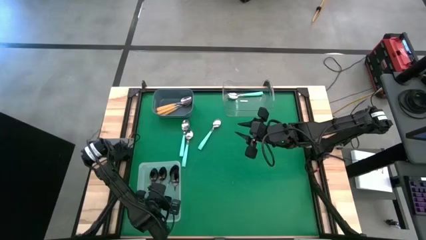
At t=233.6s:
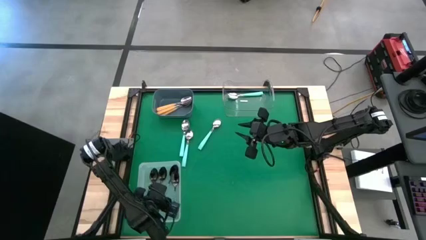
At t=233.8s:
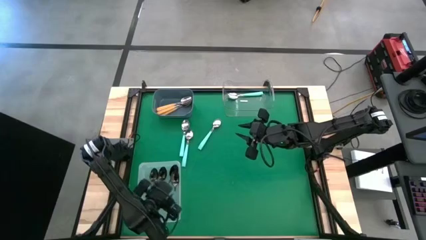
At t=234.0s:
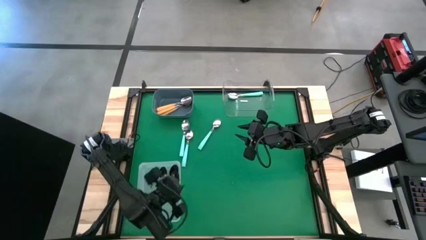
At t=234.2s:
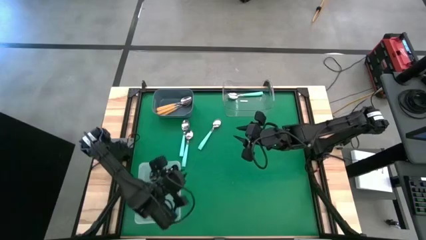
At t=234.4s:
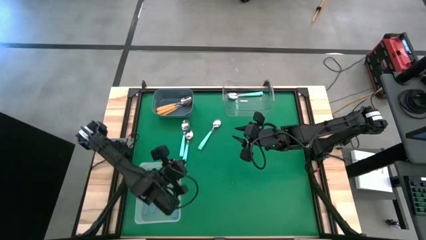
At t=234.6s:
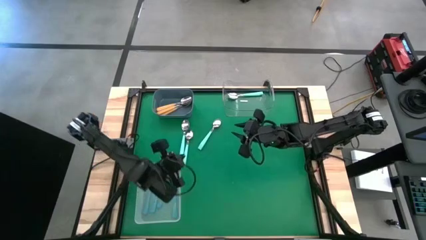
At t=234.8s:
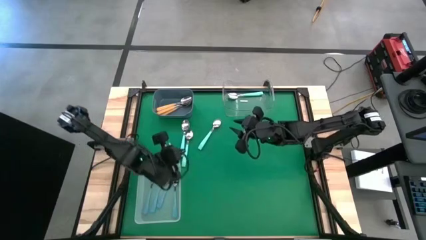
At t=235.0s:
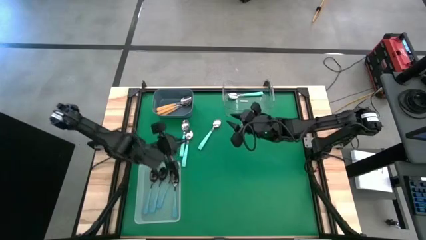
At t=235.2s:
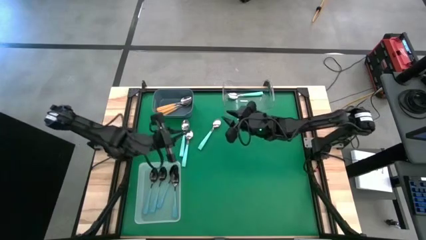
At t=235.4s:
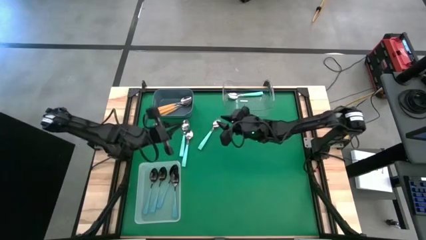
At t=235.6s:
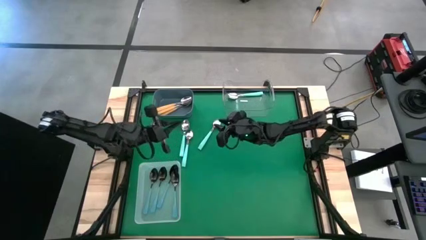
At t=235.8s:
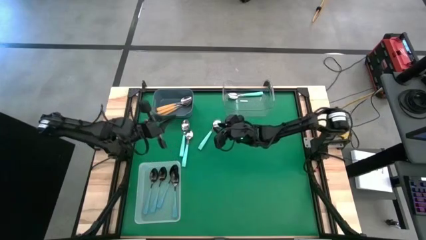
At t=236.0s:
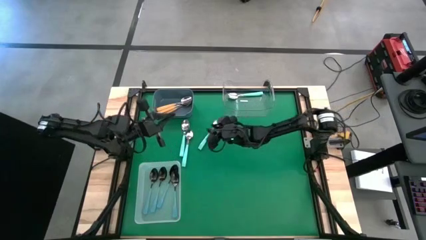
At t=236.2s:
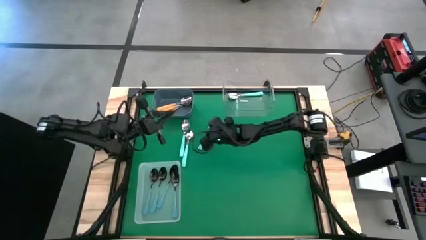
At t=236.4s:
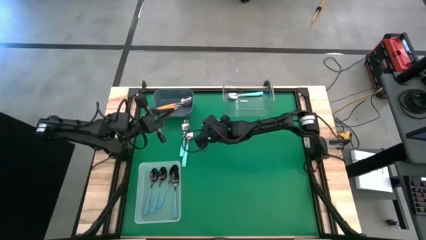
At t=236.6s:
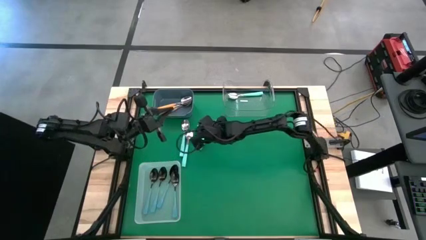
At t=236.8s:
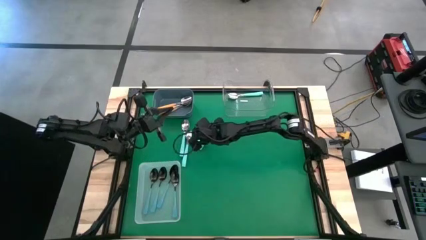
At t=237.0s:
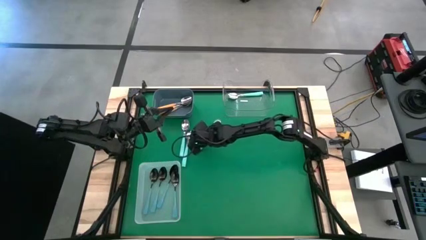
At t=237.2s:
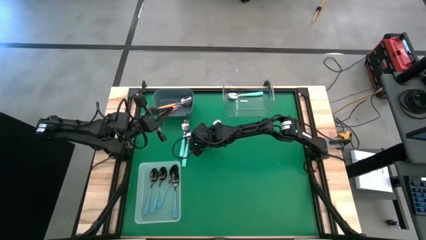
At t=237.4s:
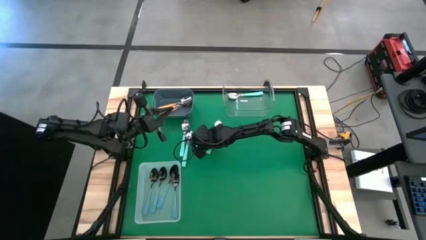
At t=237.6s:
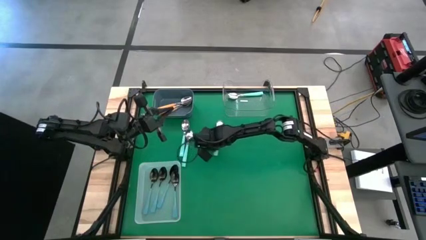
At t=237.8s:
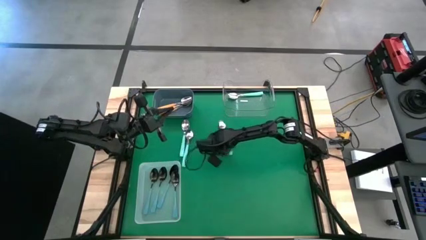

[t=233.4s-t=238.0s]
Task: Sort silverware by color (type)
Adjust the light blue spoon

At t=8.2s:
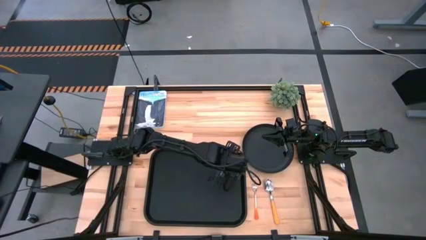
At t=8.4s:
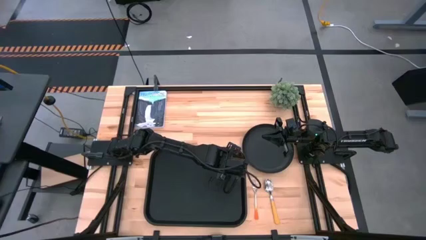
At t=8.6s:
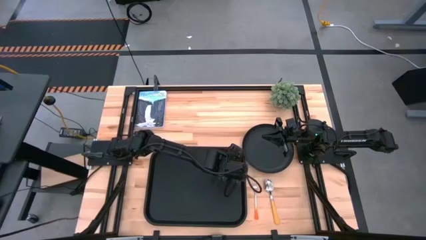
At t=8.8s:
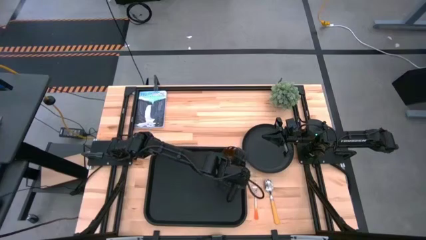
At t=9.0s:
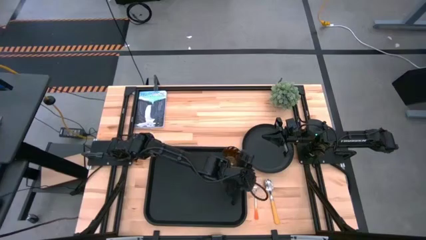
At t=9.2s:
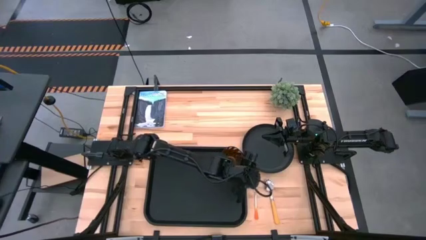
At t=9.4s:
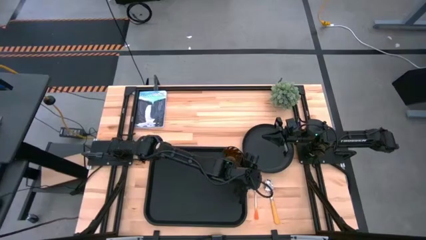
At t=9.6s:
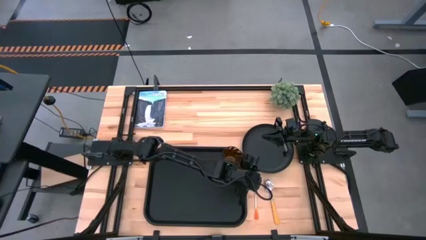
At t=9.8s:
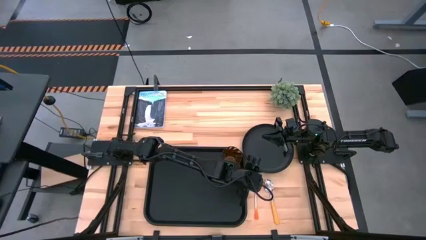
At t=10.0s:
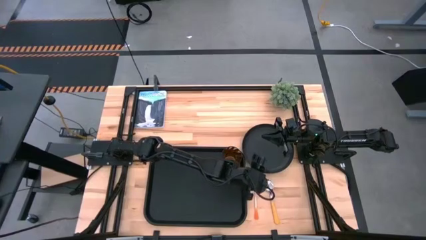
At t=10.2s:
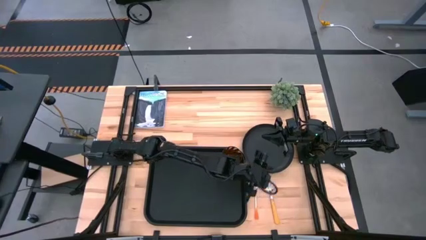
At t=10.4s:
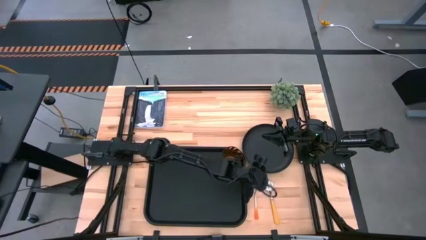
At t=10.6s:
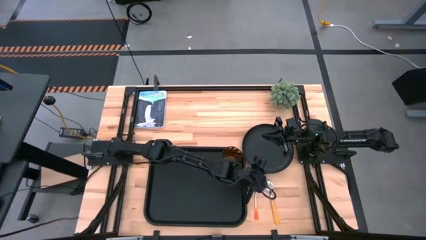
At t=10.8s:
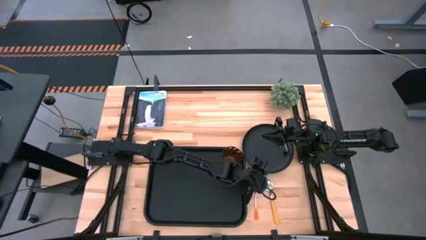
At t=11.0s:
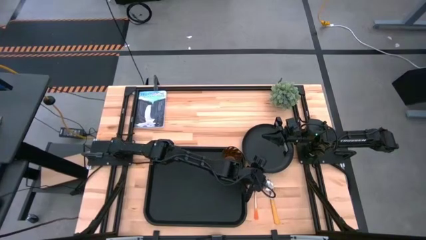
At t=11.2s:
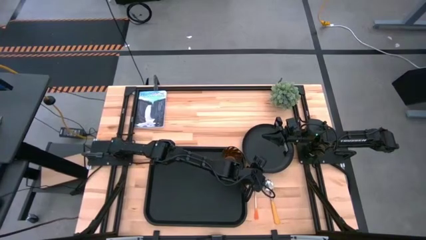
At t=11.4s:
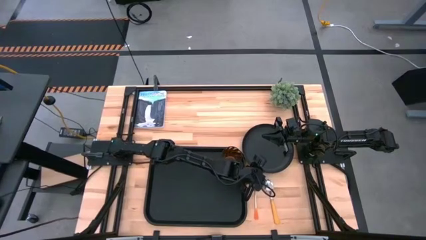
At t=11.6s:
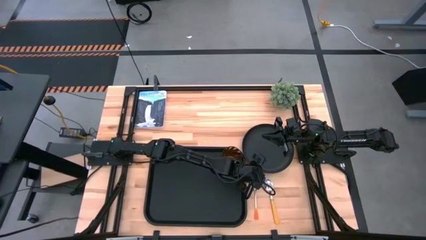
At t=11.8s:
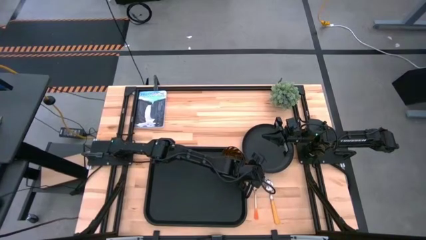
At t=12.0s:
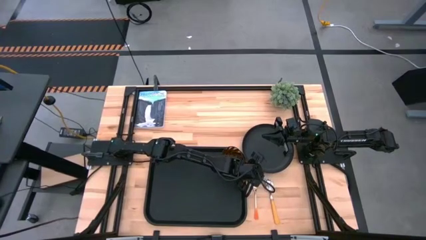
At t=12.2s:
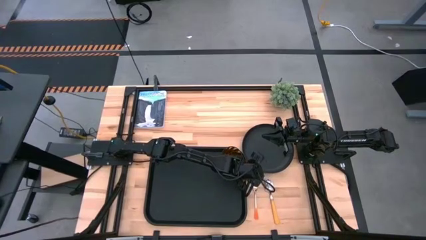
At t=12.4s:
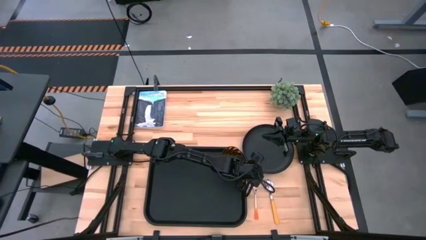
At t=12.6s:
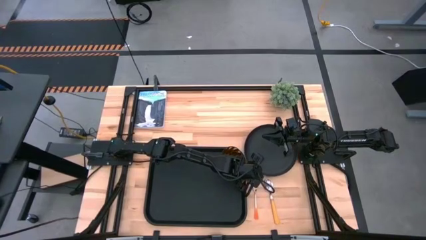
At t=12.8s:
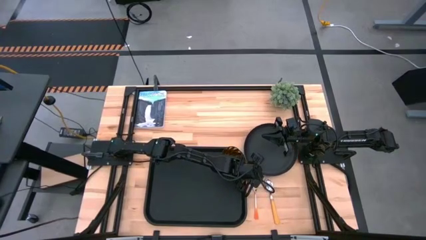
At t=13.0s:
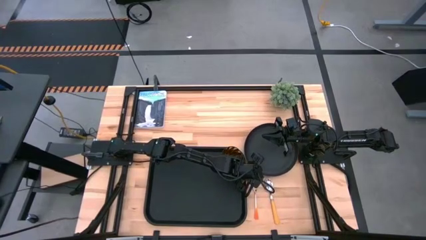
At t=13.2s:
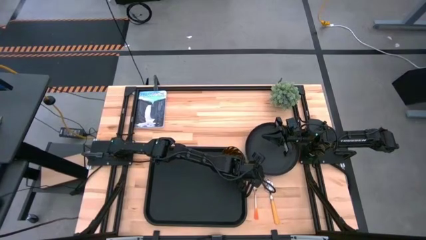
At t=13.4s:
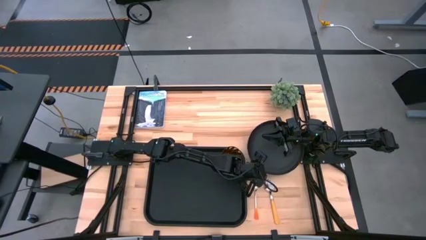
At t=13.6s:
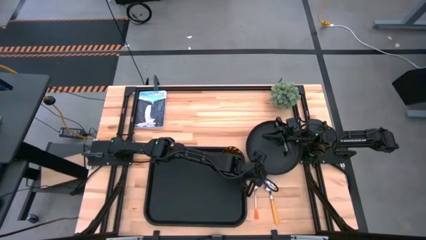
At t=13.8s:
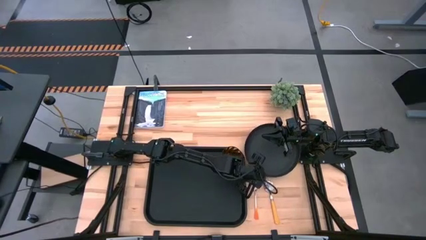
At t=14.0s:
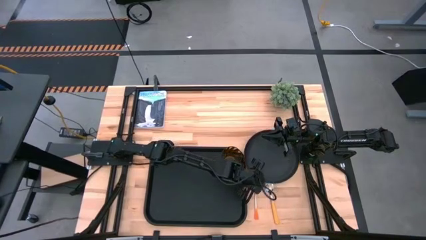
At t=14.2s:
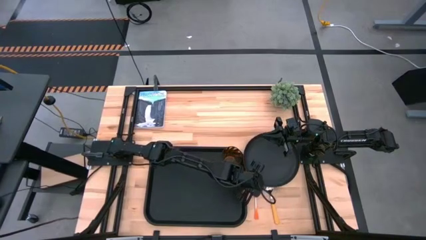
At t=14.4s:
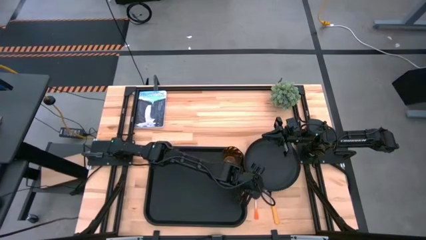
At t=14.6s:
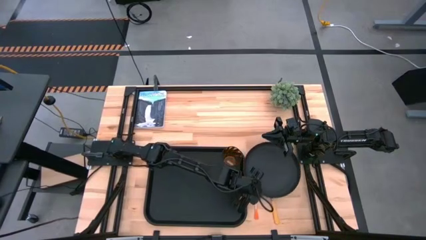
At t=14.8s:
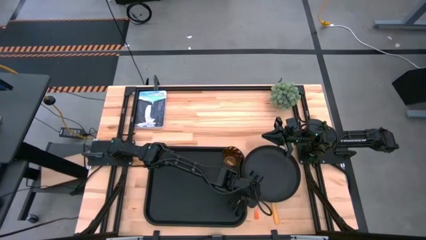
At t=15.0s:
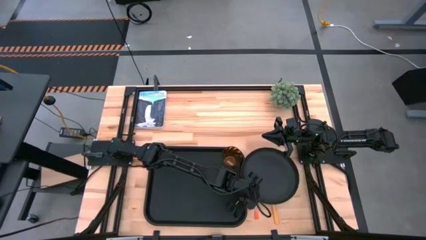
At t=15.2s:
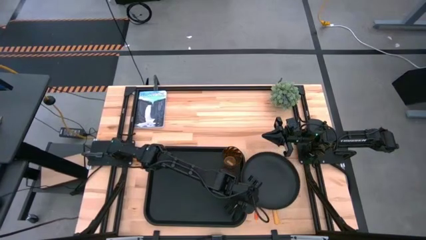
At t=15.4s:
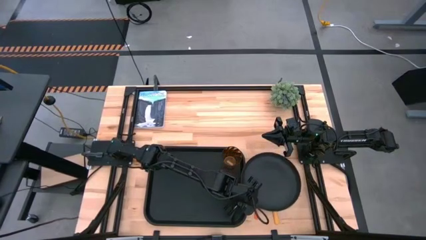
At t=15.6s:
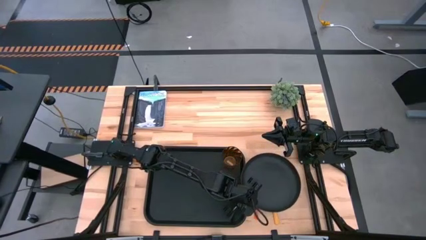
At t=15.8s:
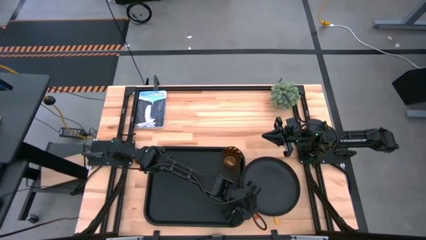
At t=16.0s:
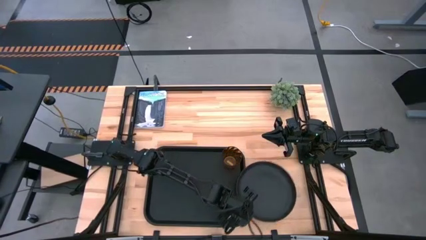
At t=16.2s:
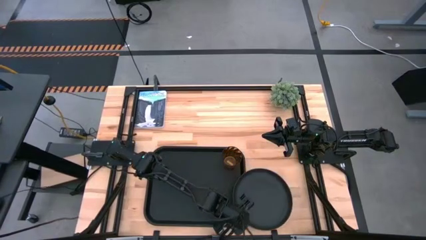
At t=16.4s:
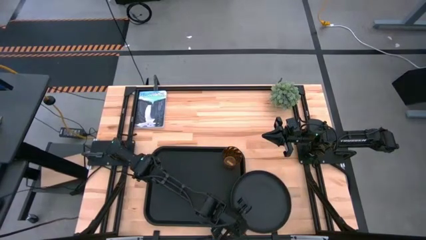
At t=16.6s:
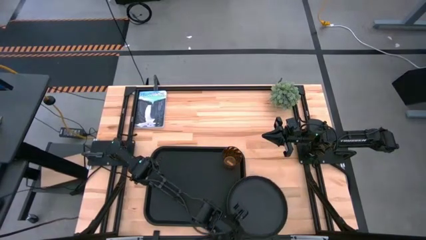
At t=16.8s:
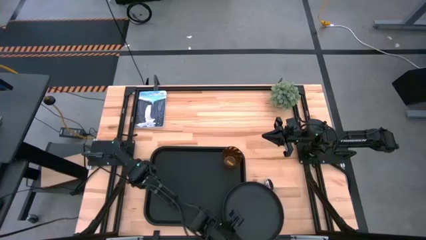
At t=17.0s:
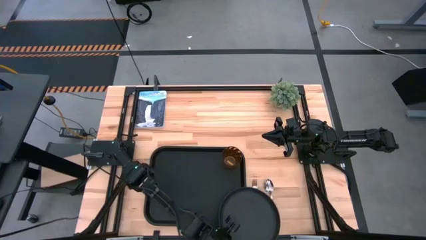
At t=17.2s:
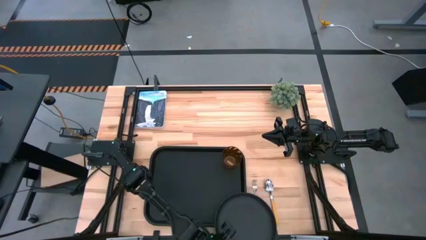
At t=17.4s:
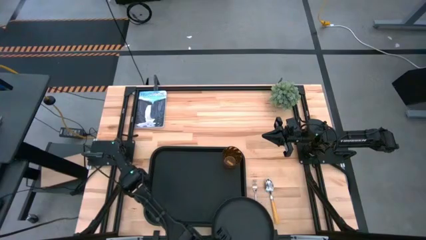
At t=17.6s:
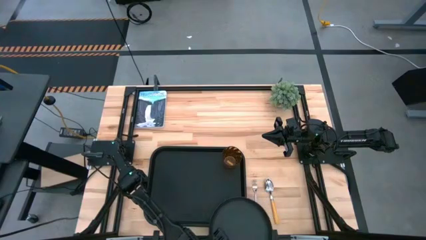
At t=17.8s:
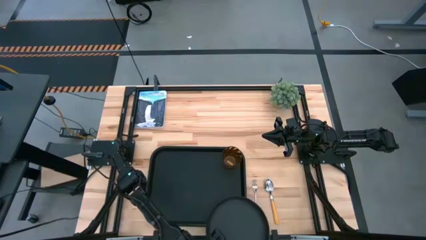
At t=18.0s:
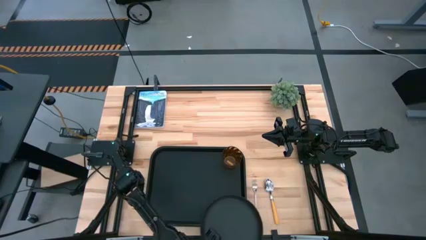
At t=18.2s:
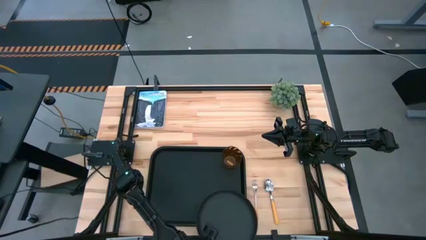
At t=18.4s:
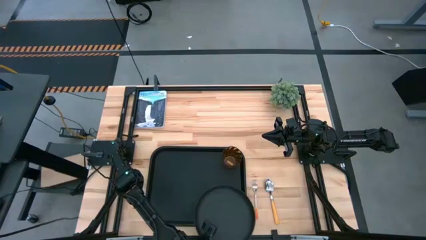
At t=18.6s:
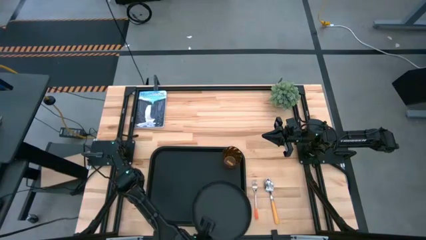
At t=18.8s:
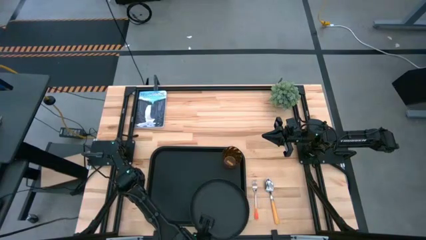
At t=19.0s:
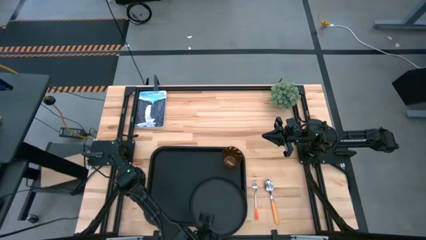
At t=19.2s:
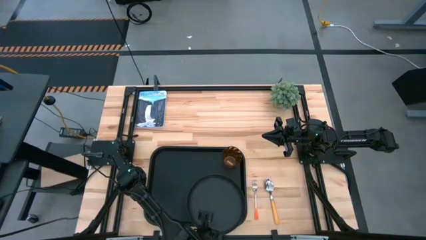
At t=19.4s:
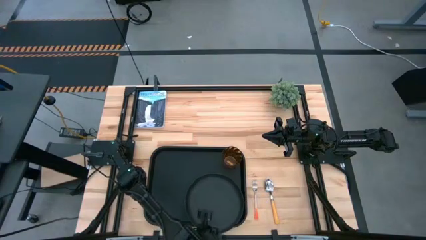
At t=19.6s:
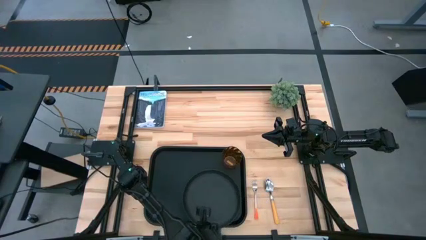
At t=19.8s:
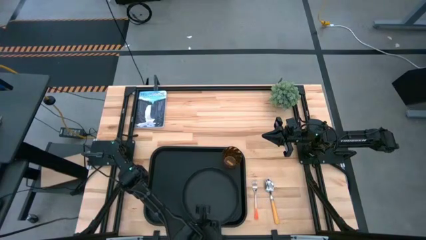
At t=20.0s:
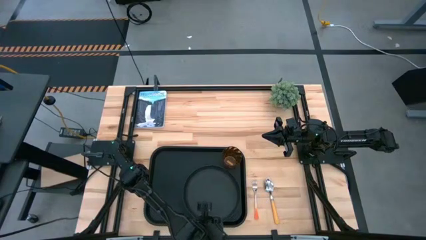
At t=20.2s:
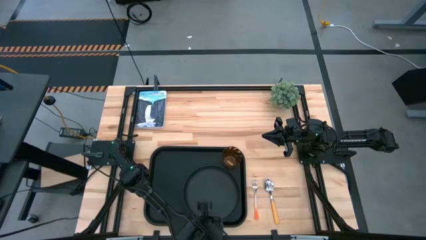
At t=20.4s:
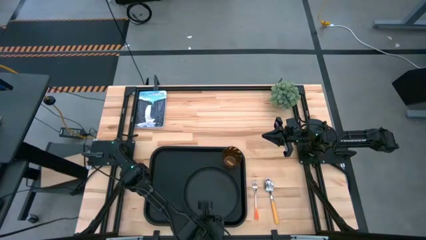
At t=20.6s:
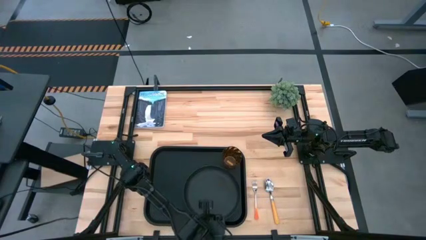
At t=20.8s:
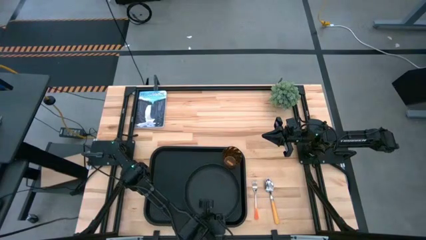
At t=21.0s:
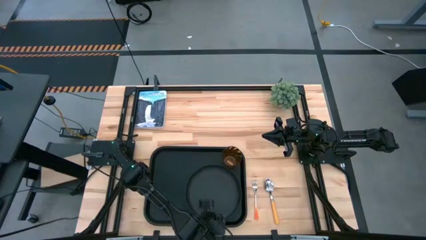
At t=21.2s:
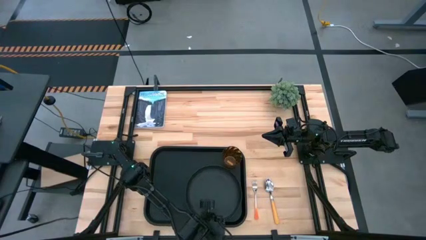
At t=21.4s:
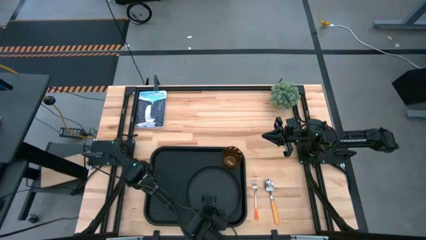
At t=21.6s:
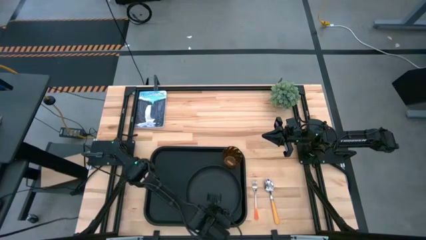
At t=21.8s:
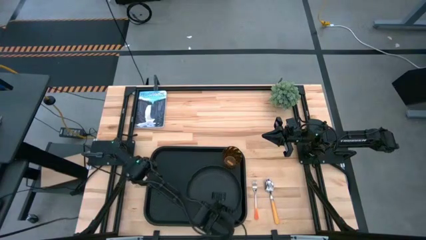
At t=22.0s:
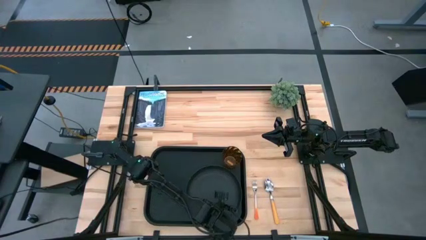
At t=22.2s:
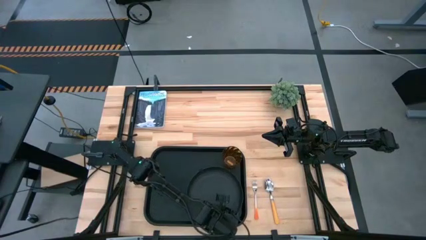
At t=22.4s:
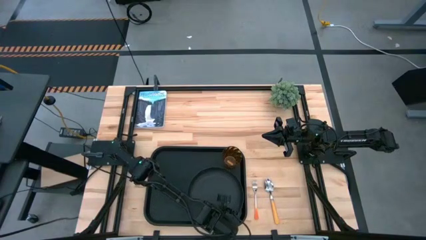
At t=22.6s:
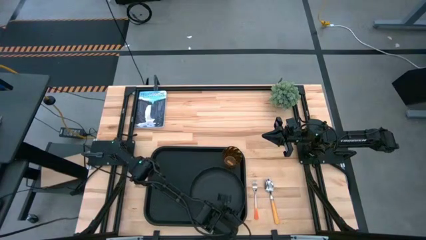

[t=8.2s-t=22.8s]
Task: Pick and place plate/cup/fork/spoon on tray
Put the black plate on the bottom of the orange cup on the black tray
